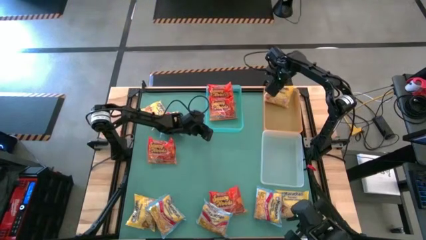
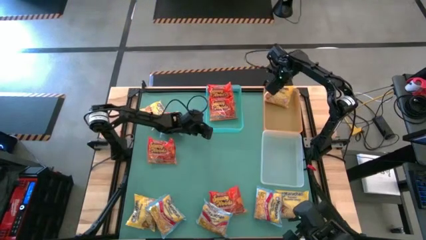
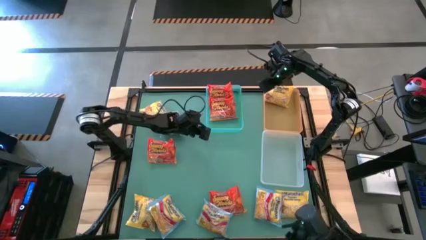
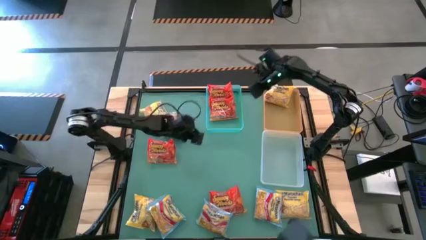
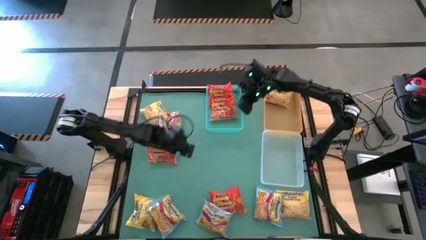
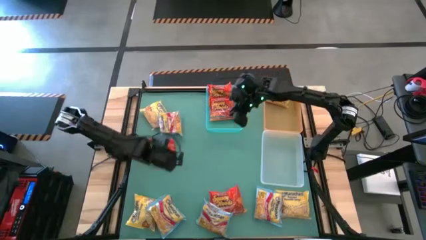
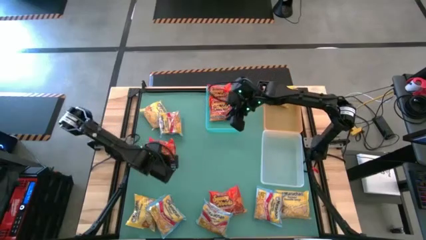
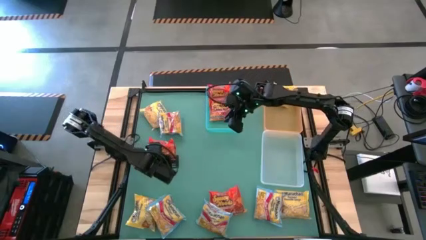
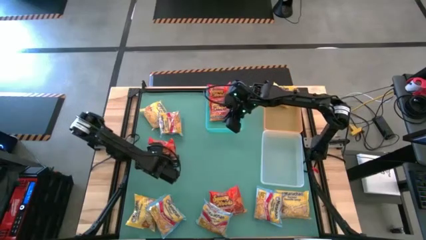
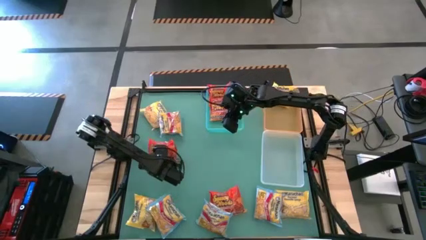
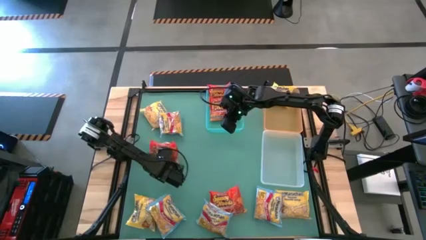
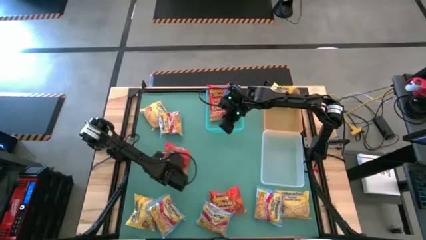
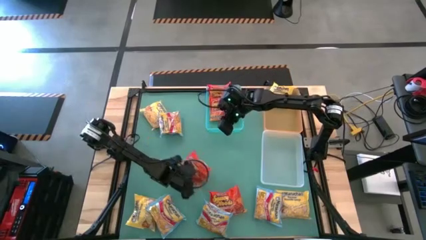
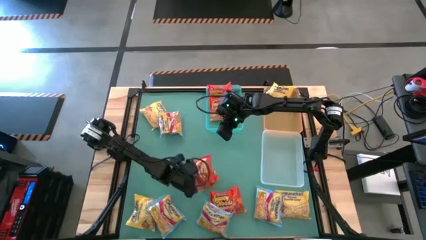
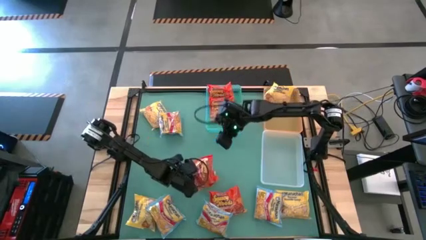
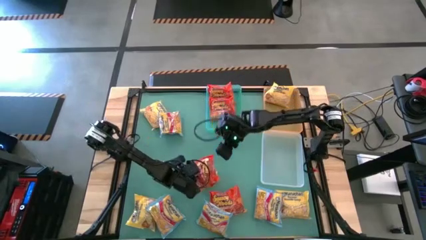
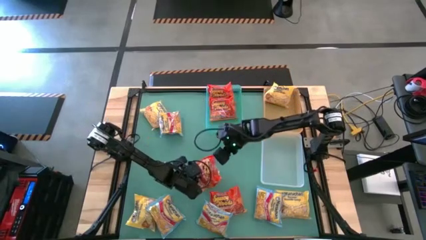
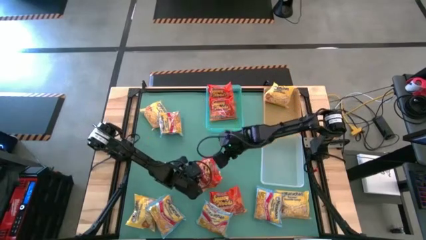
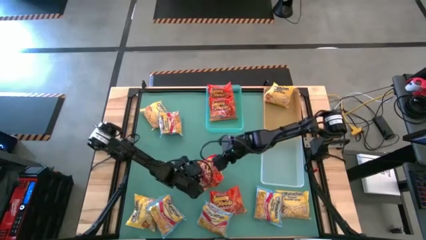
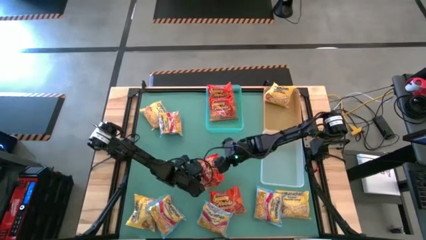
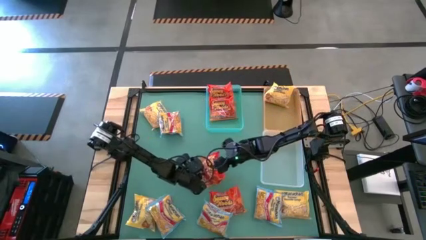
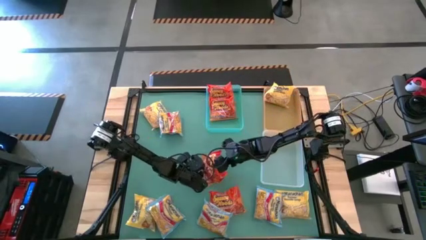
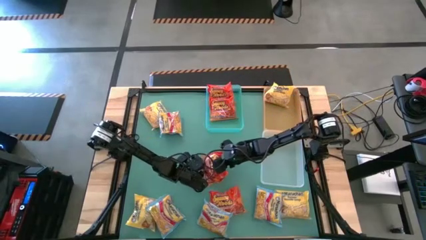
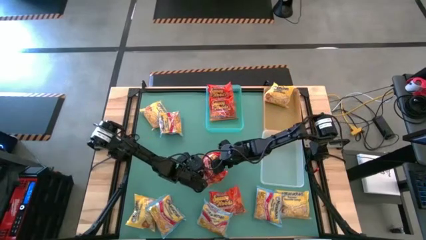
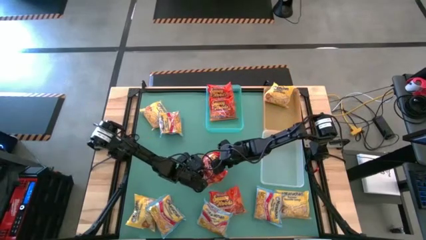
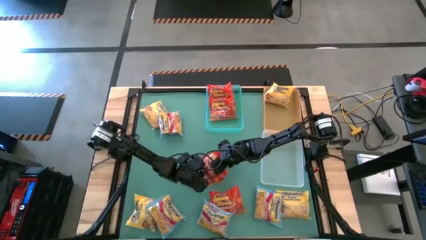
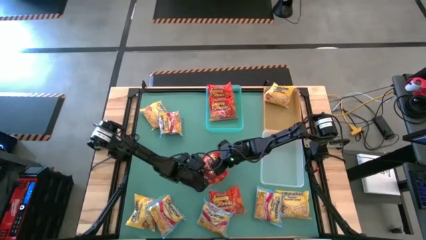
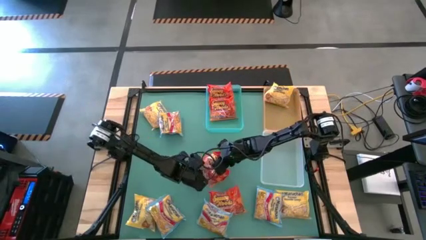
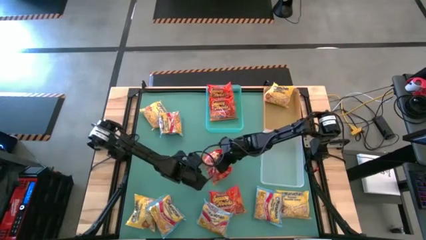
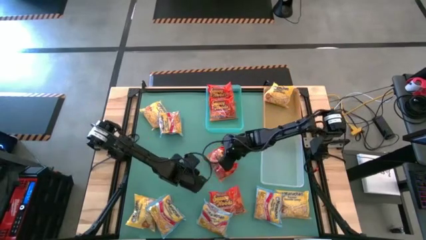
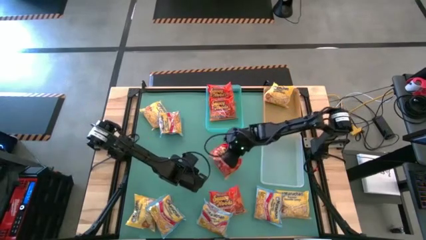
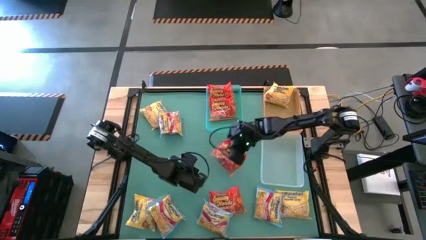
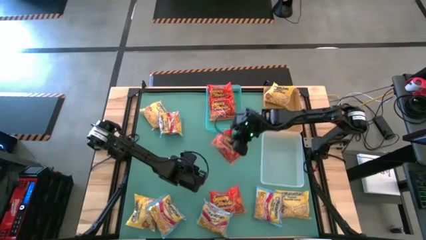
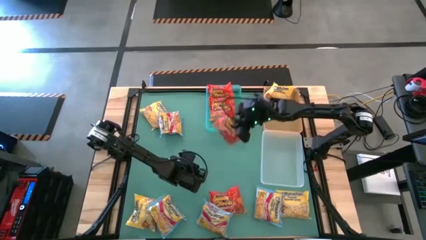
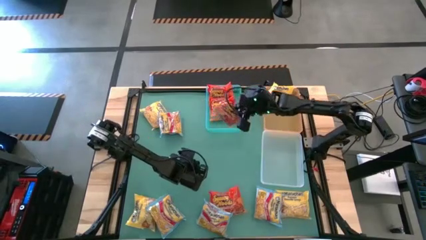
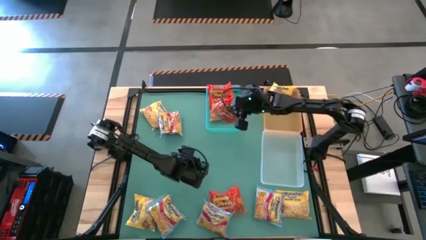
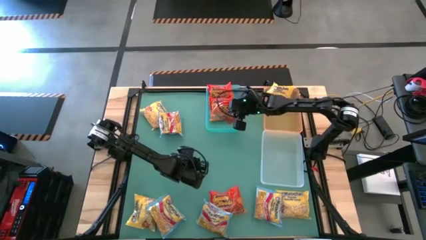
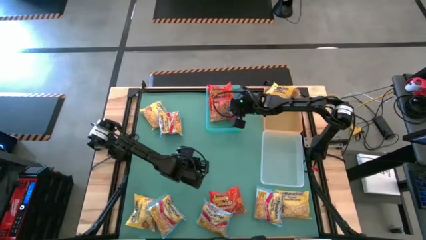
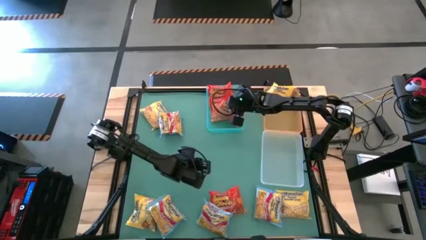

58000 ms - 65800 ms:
Task: Sort Maruchan noodles
Put the orange noodle pack into the green bin

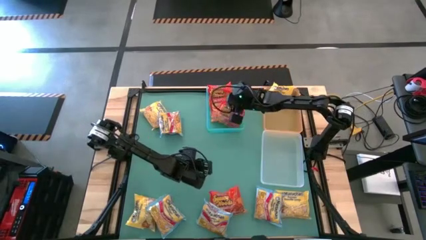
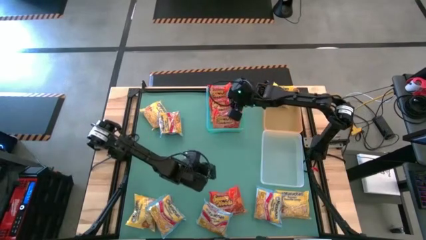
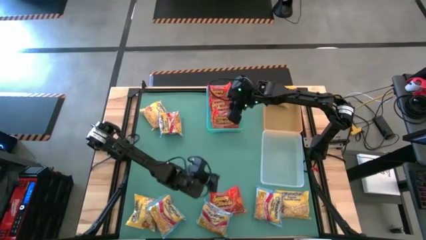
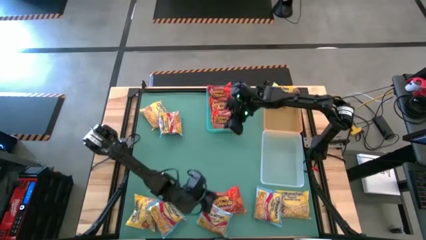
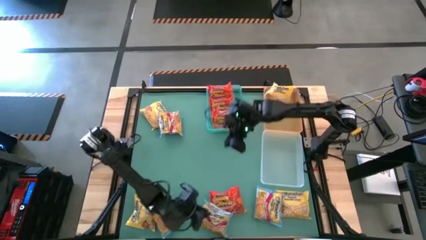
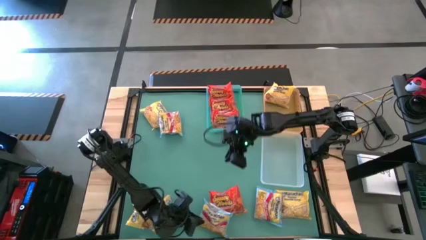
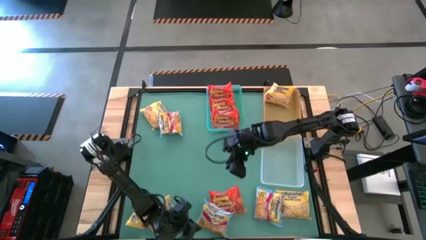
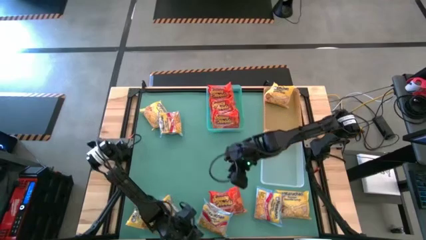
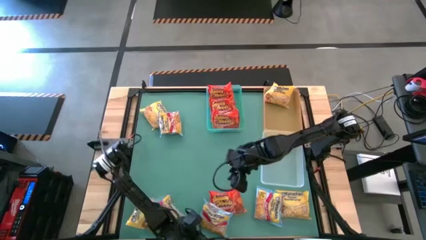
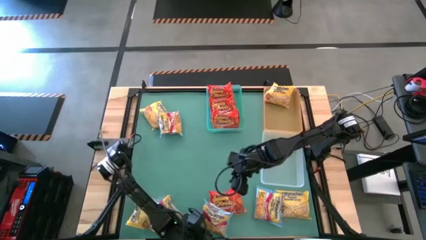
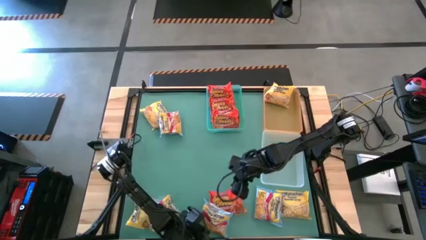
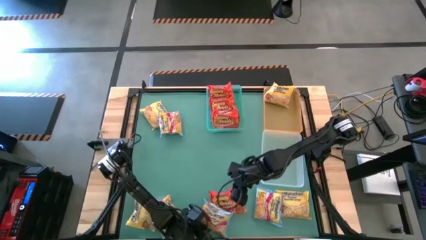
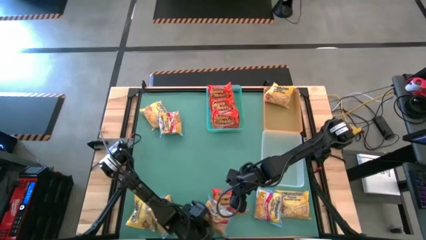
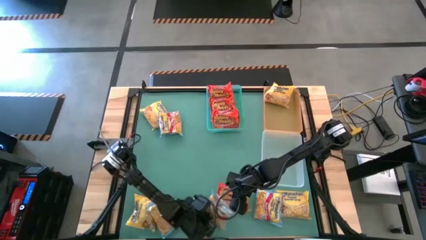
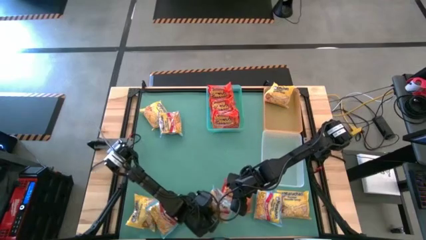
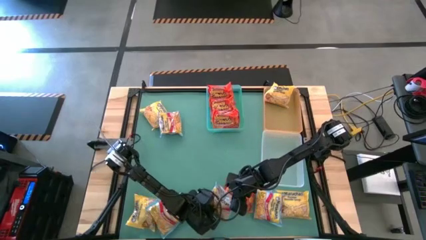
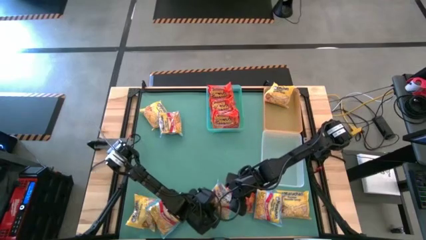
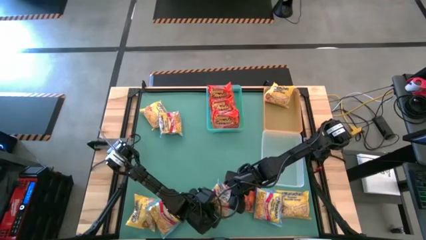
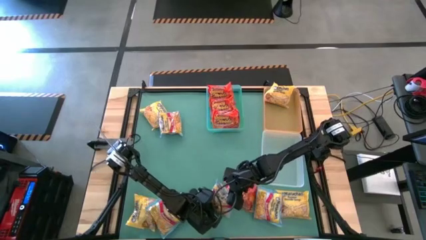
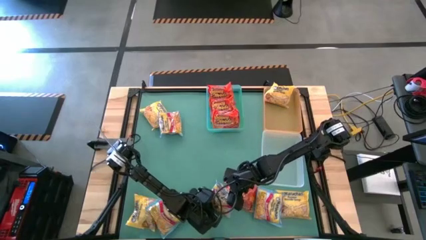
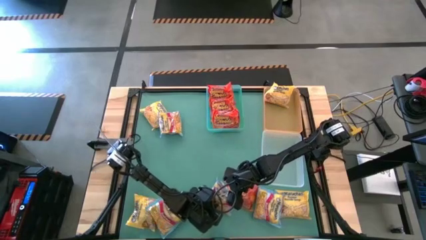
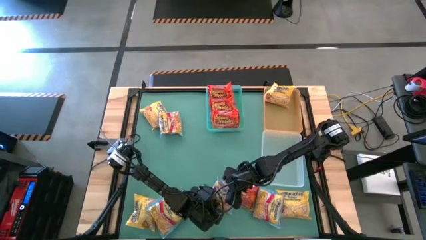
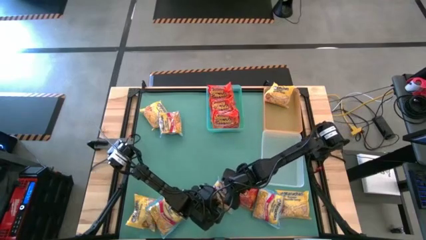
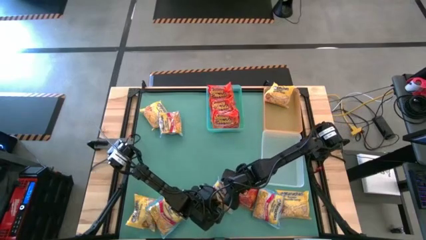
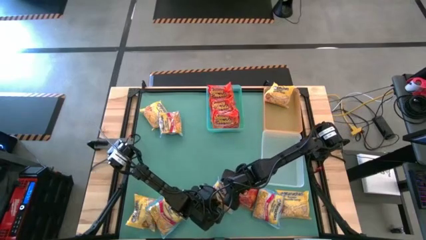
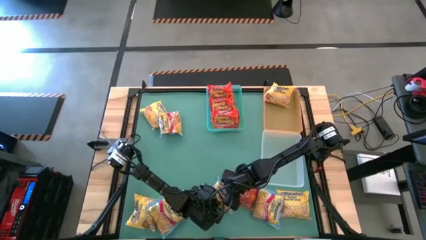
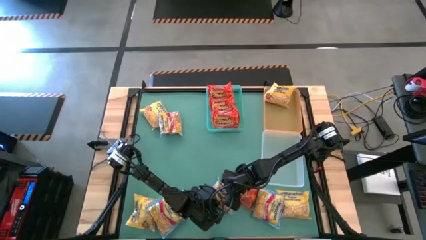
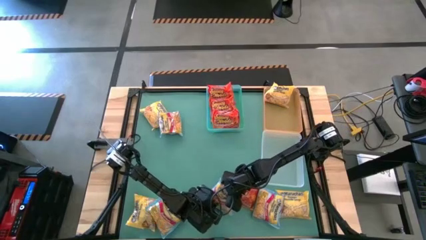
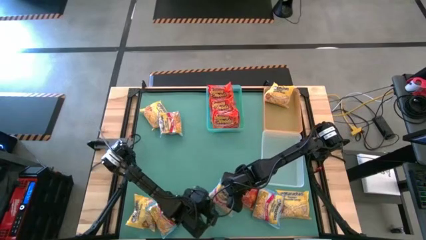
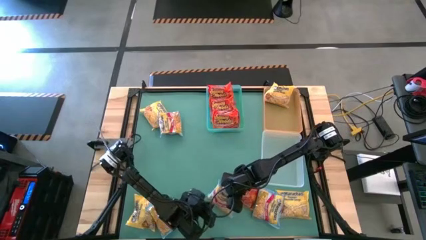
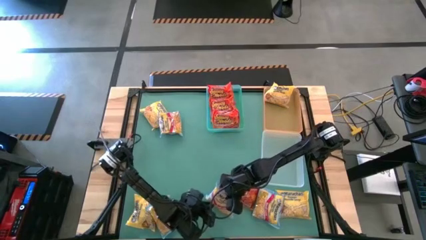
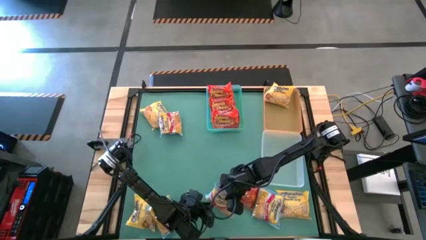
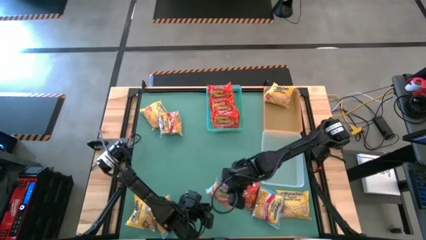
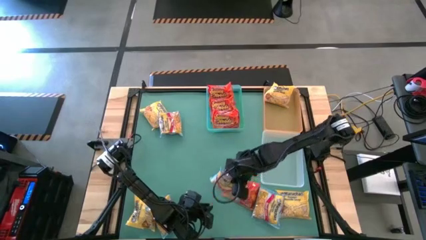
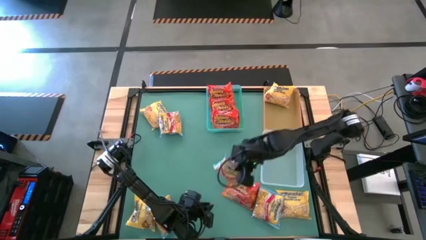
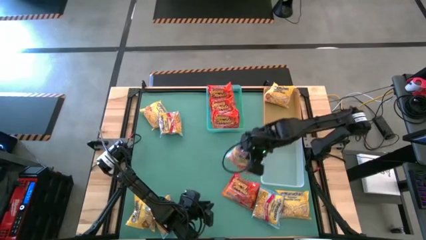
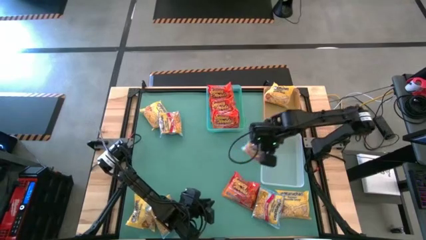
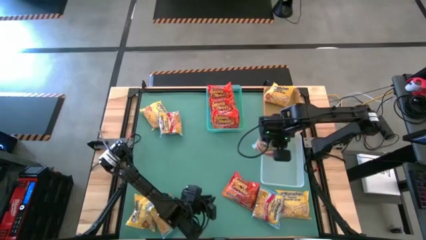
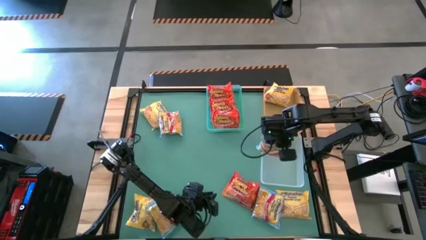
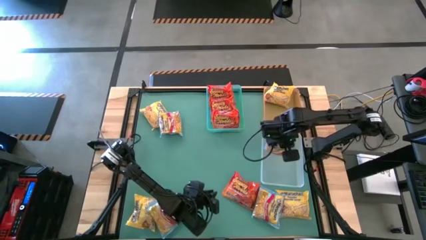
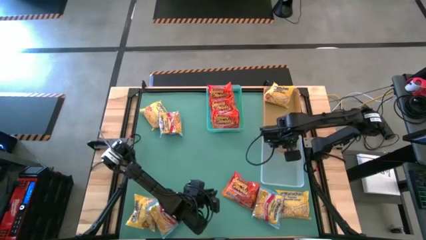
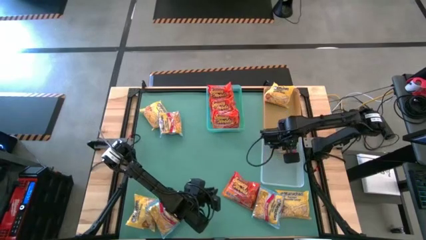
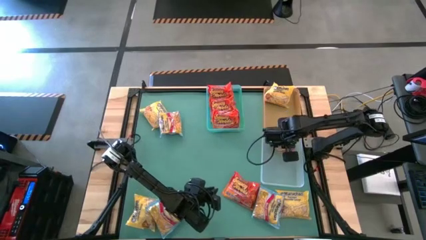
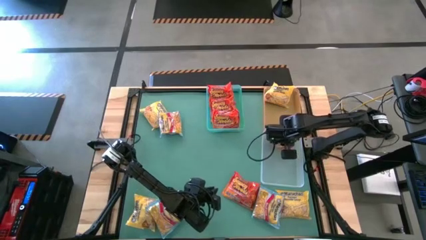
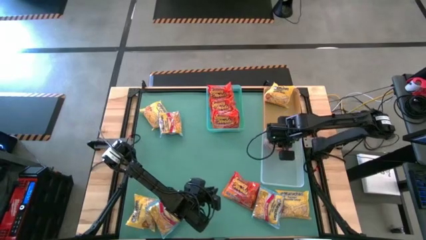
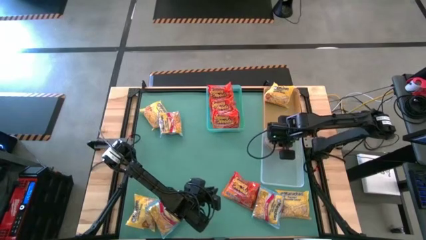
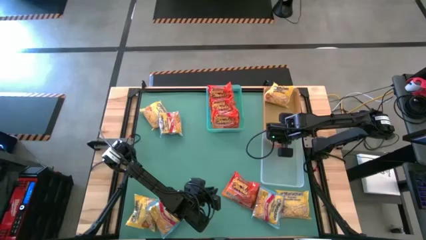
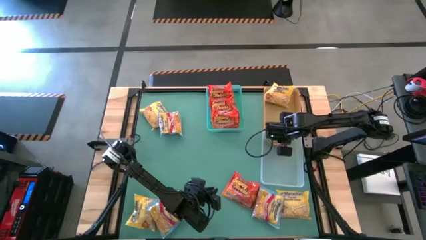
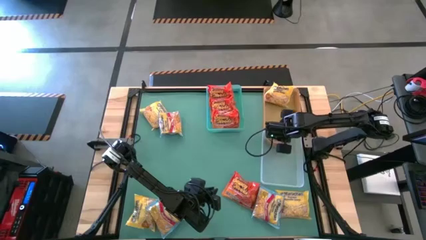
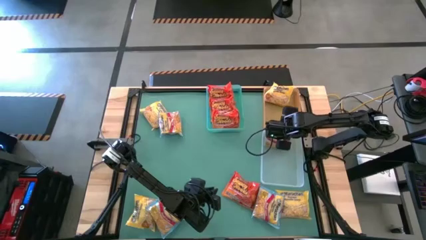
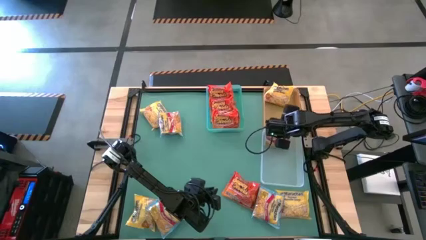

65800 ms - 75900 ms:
Put the blue noodle pack into the transparent bin
